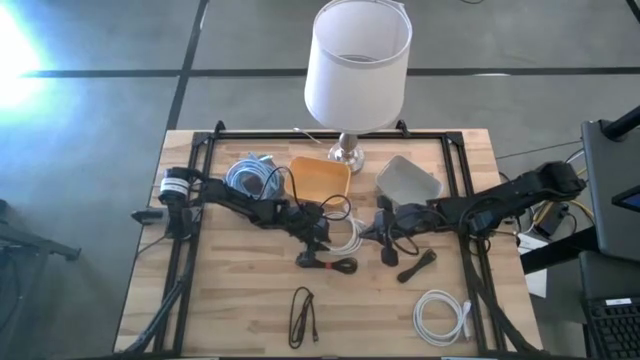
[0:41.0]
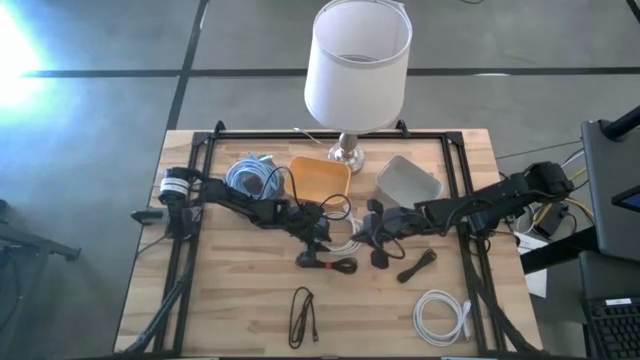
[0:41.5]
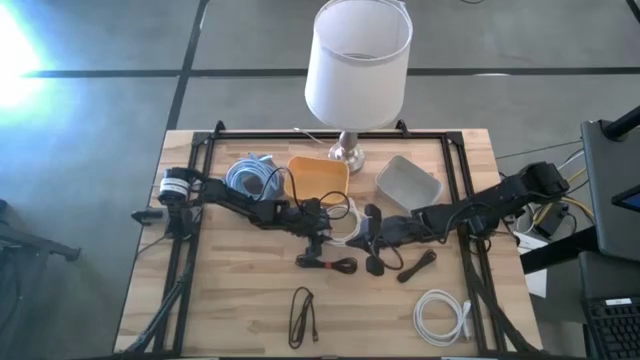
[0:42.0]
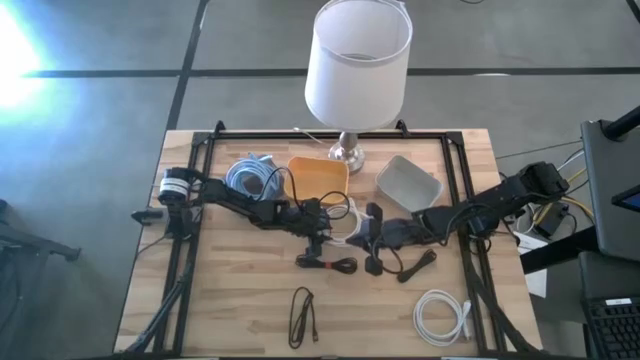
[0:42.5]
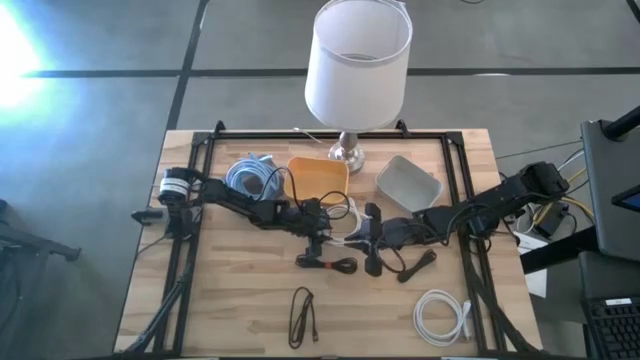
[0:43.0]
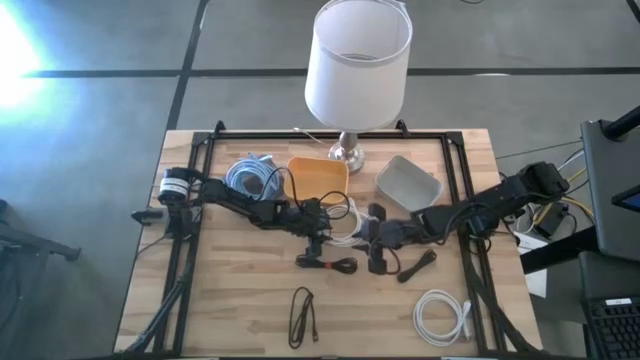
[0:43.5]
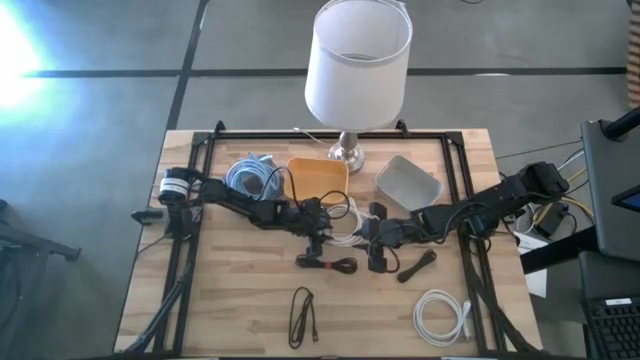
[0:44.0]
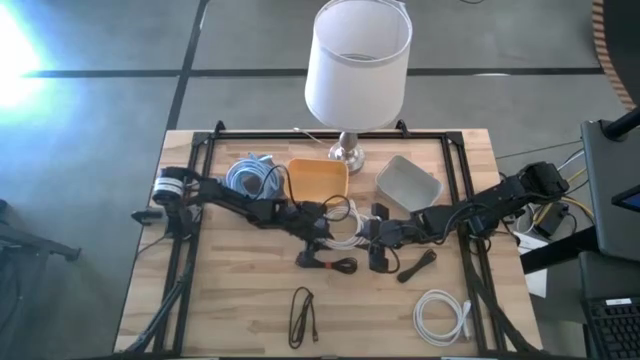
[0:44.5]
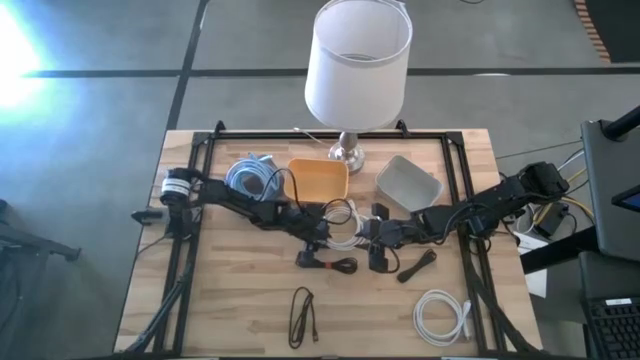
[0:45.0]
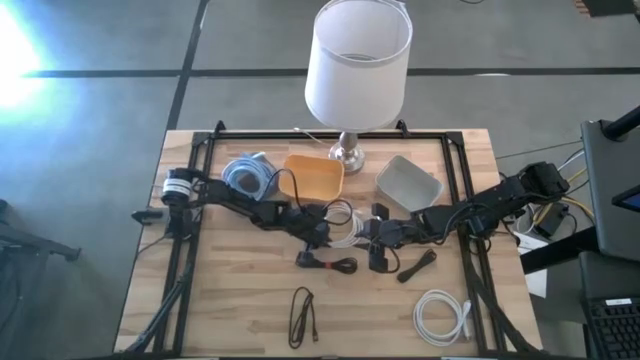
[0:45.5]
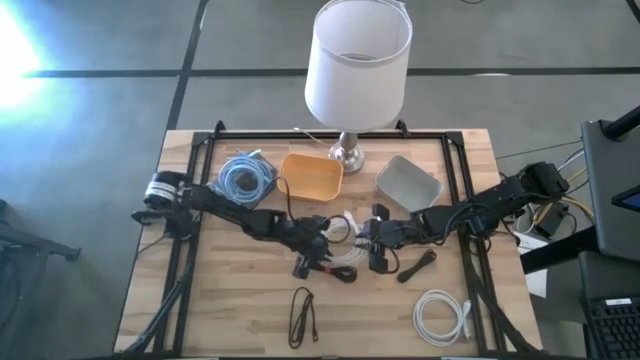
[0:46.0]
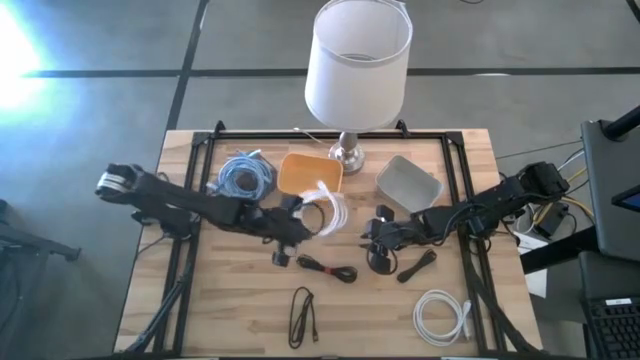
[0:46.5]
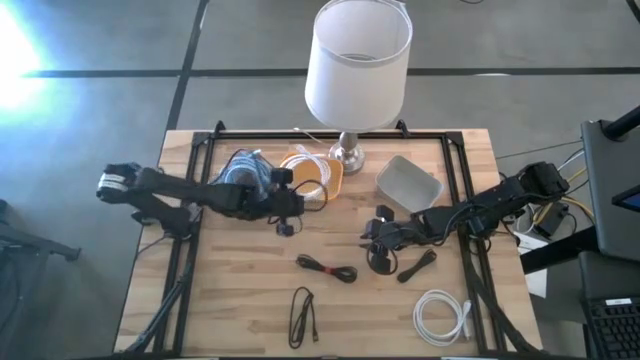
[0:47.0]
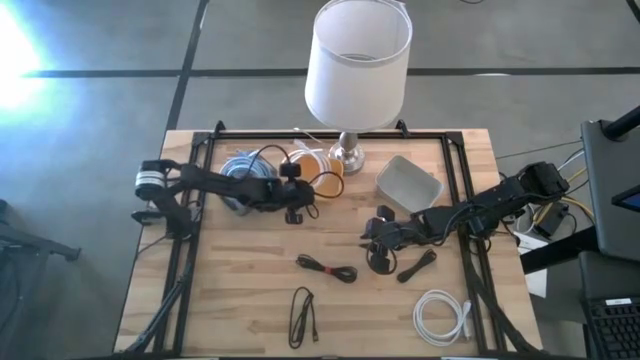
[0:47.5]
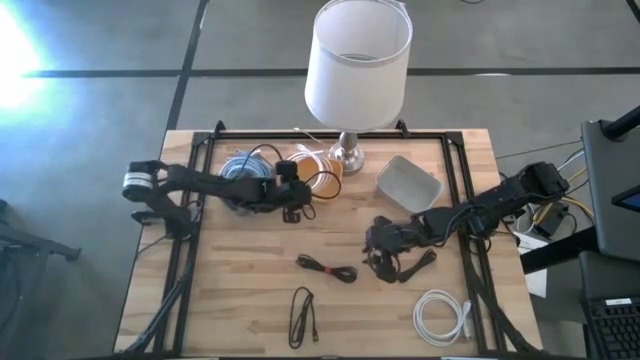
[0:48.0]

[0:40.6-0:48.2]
Task: Sort HDMI cables
Put the top white HDMI cable into the yellow bin

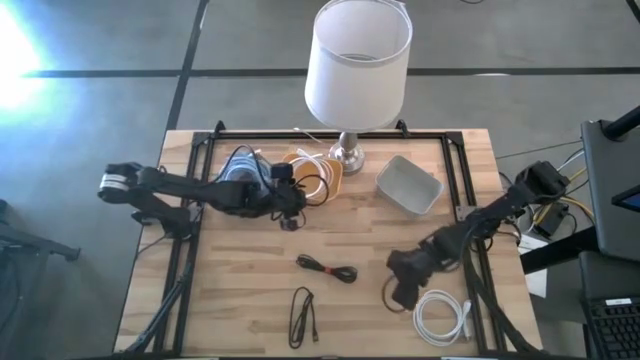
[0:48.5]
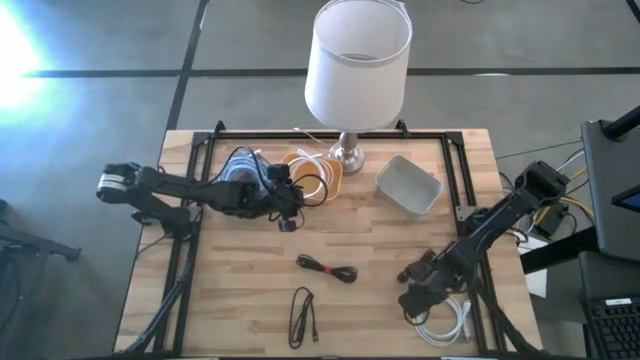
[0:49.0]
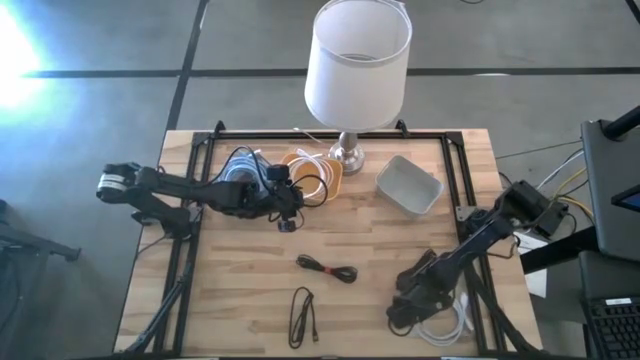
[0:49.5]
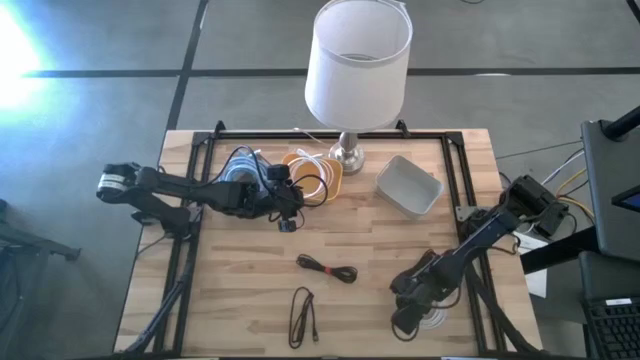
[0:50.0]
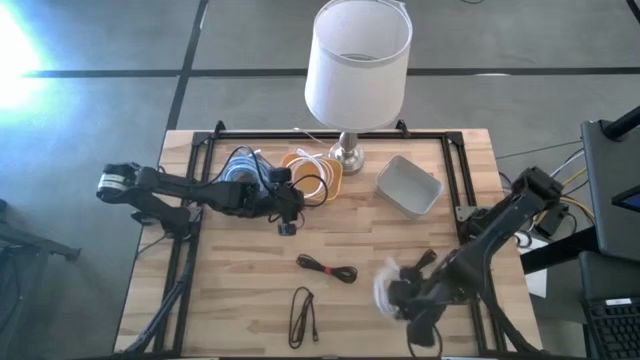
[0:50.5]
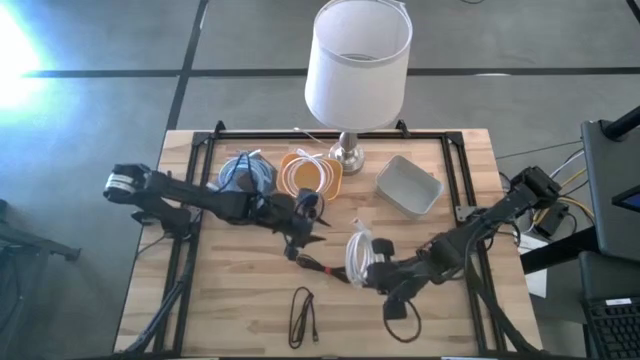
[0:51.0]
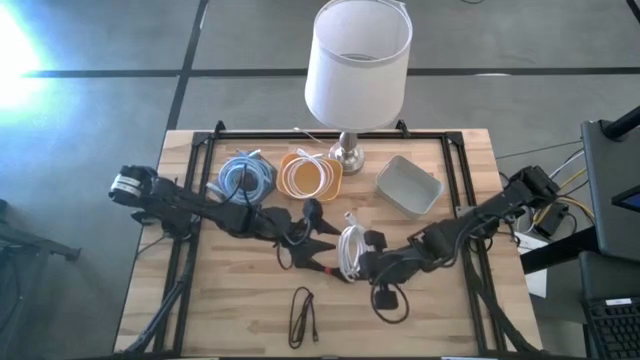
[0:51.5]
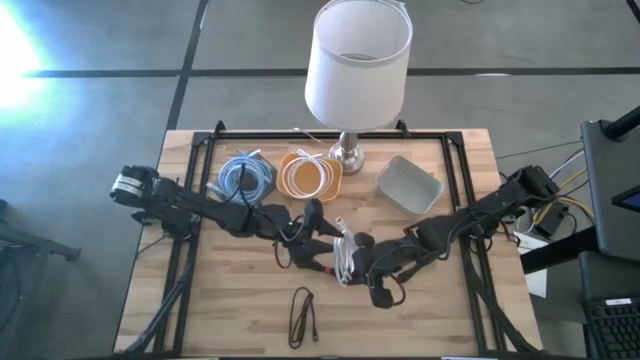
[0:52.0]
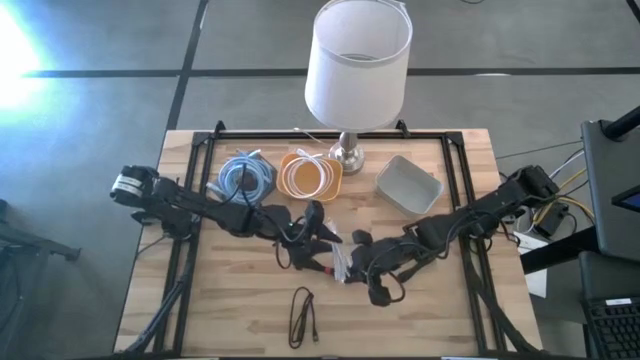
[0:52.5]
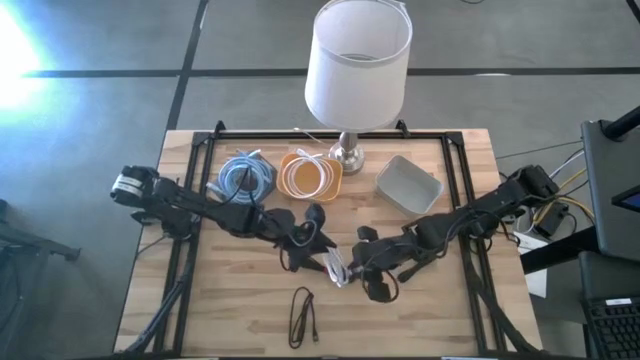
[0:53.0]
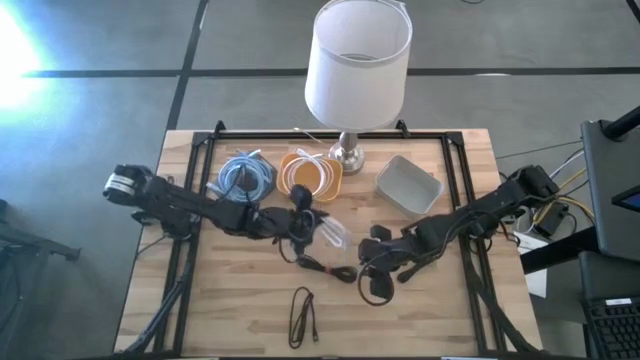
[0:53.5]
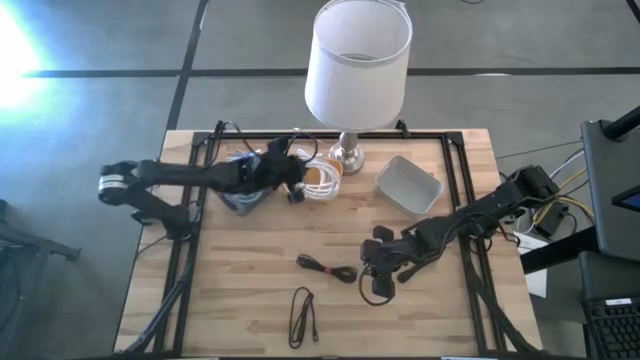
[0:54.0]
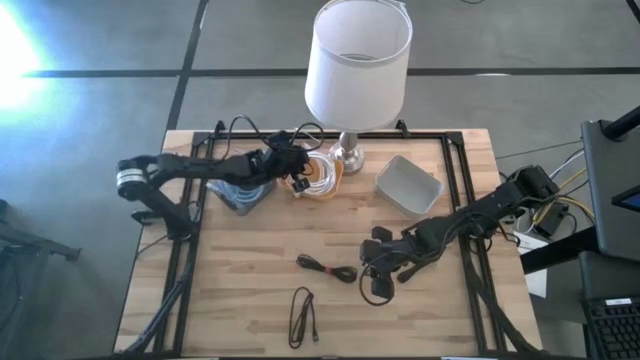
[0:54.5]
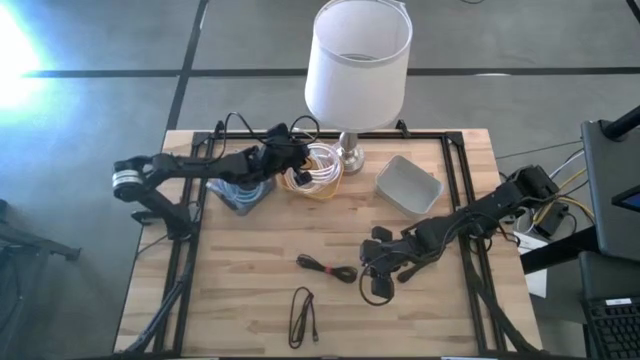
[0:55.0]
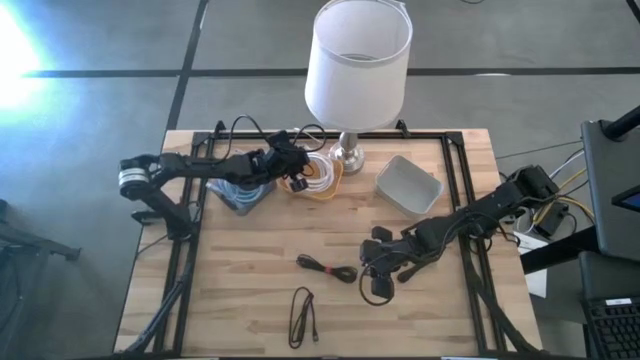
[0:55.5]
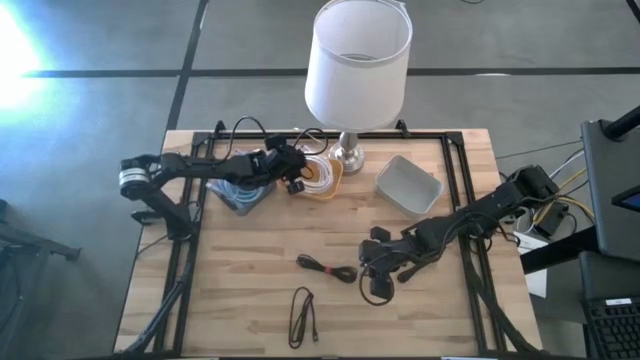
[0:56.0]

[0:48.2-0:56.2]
Put the white HDMI cable into the yellow bin

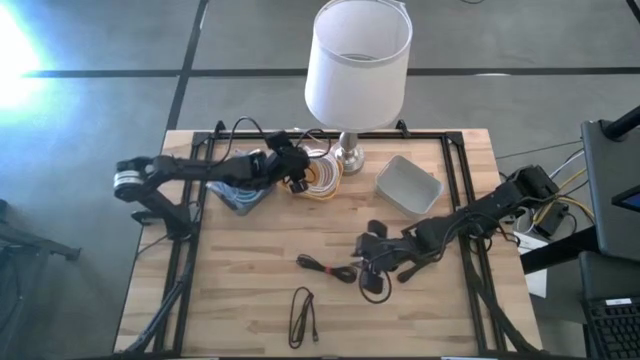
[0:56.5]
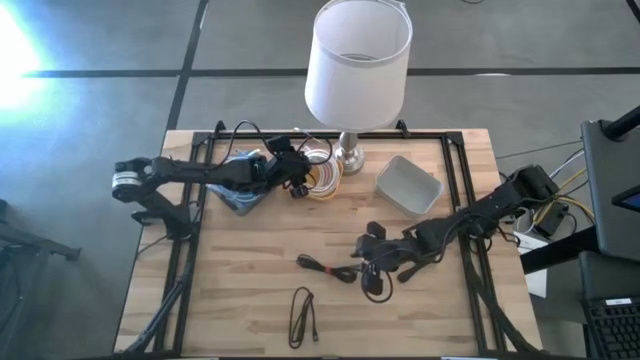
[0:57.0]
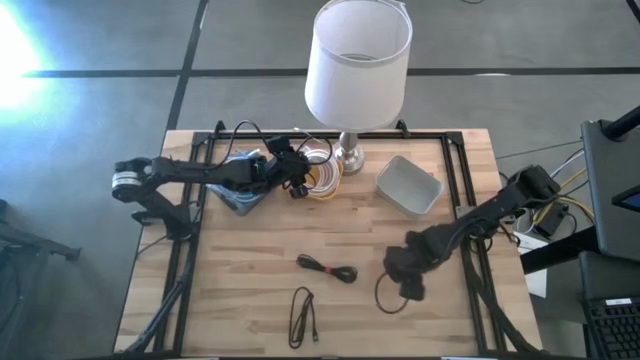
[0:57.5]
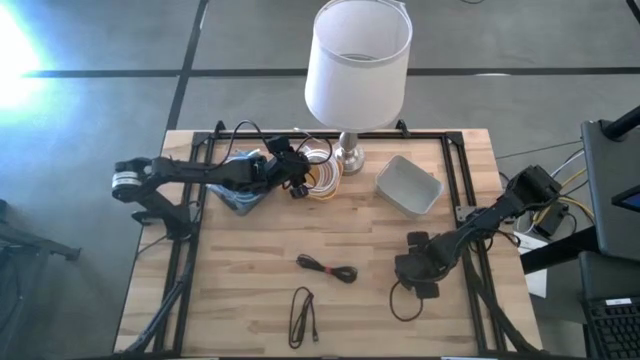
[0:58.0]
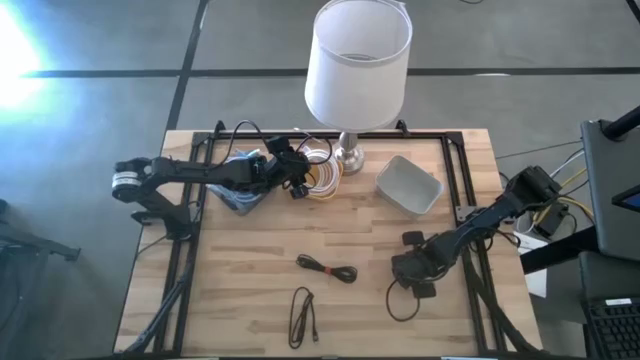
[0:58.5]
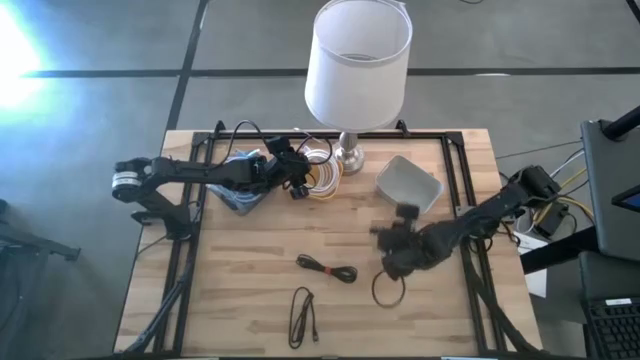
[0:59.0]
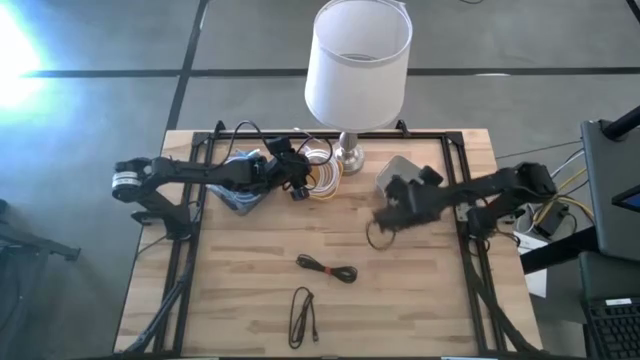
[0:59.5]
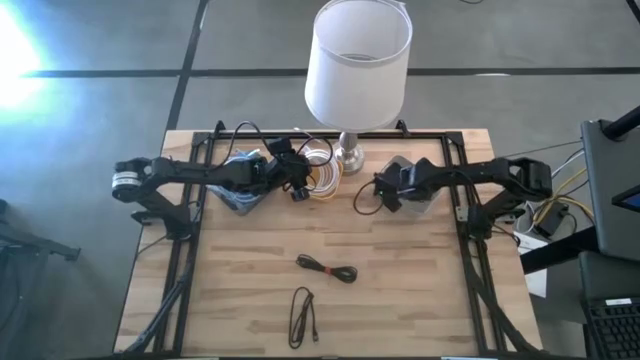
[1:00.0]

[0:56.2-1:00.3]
Put the top right black HDMI cable into the gray bin

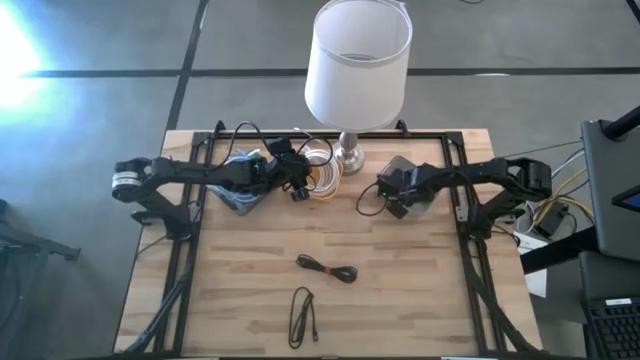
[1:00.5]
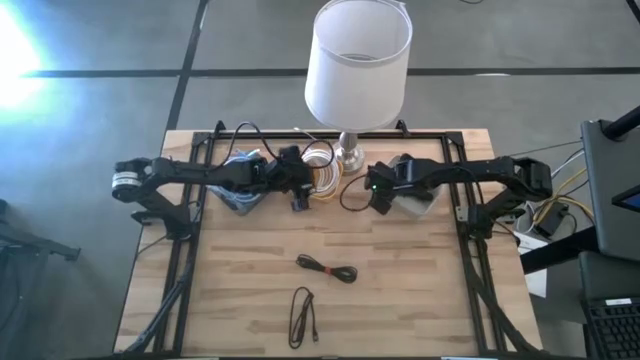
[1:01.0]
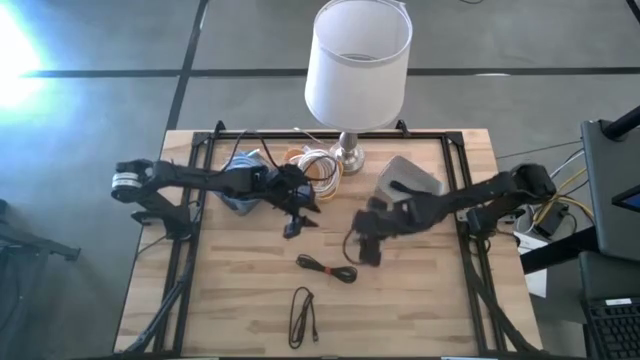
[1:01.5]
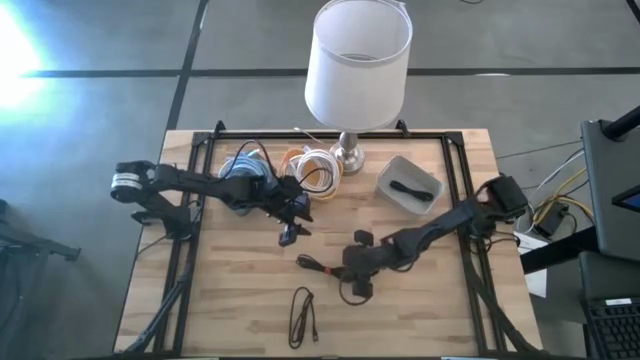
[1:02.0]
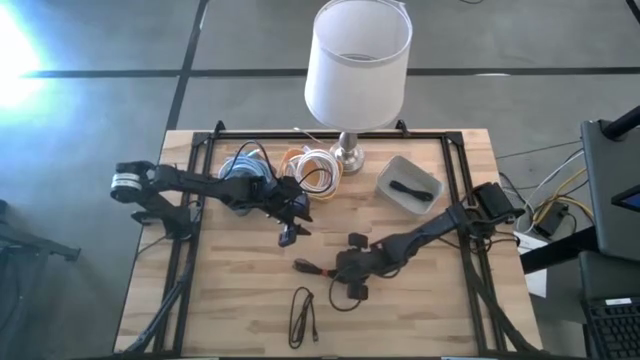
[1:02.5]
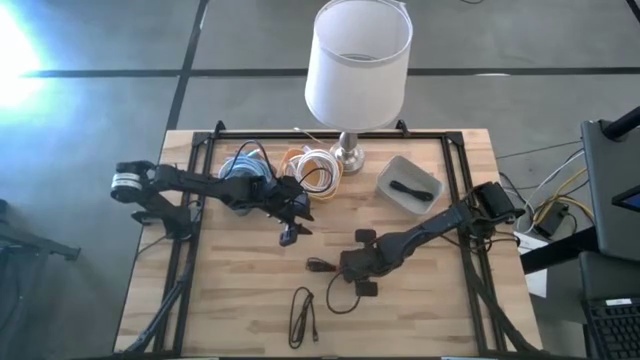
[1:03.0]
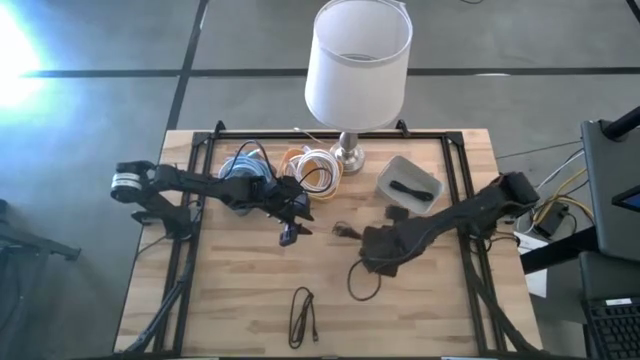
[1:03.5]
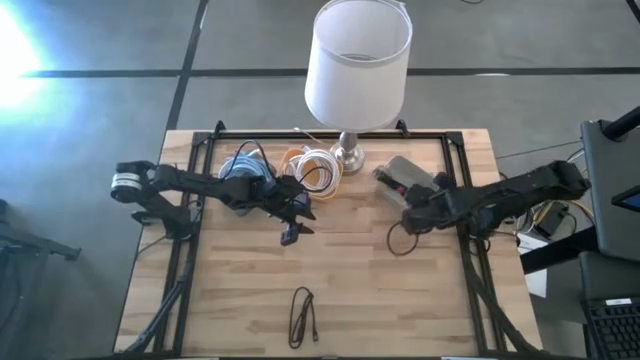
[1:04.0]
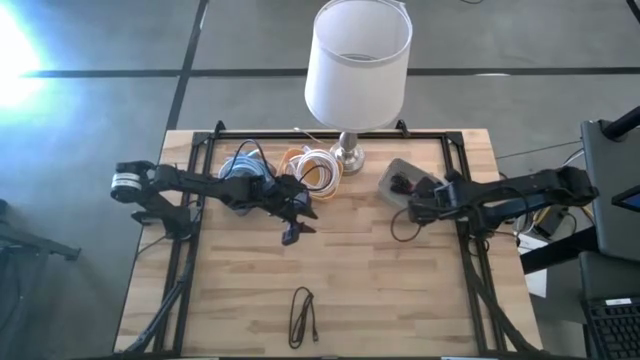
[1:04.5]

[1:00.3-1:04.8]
Put the top black HDMI cable into the gray bin
